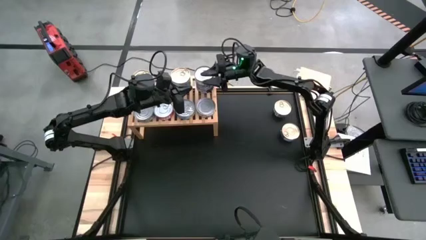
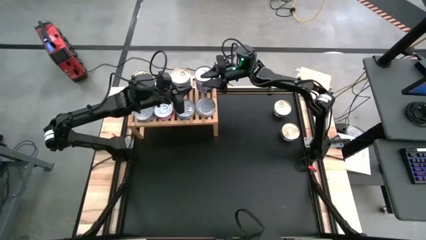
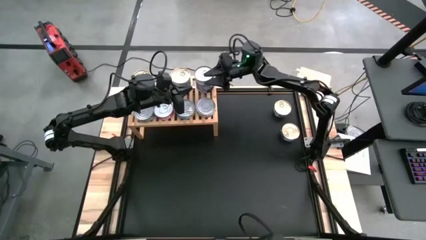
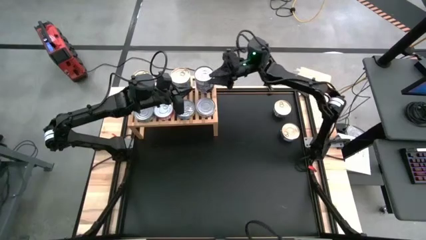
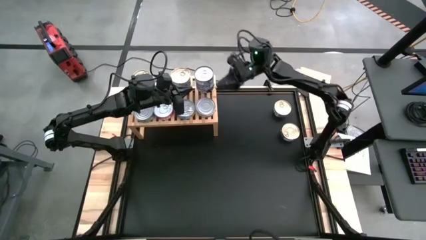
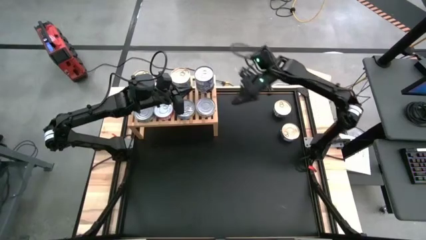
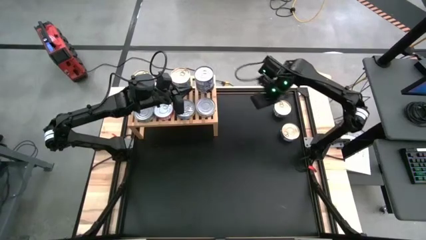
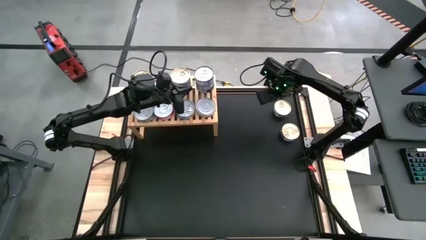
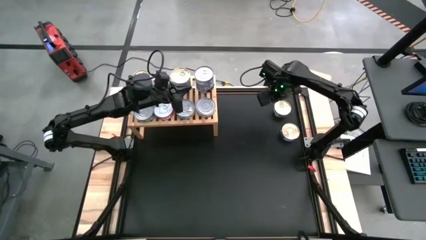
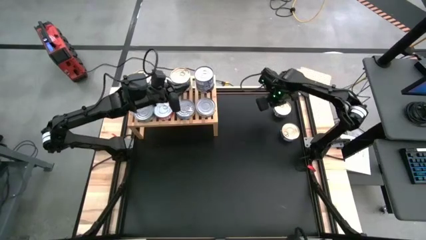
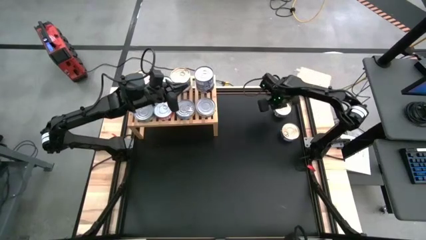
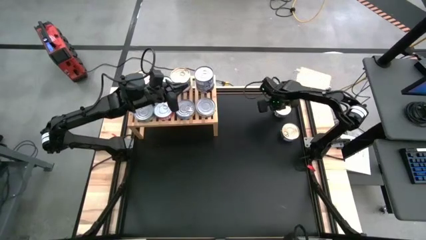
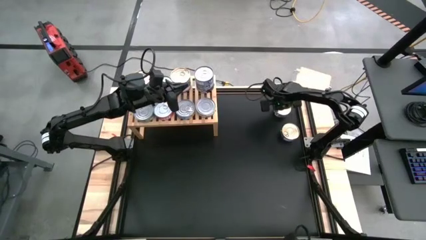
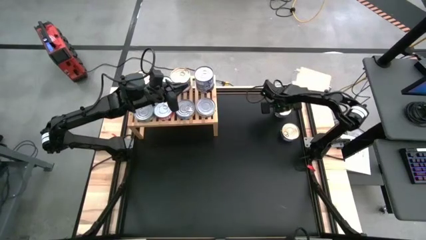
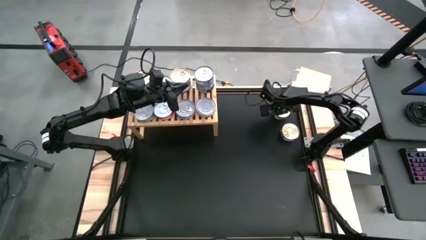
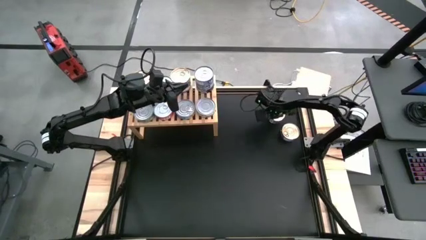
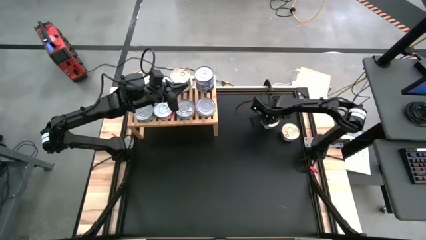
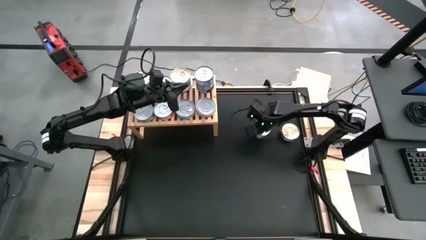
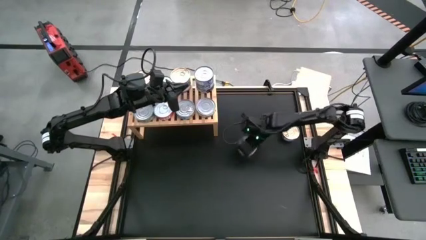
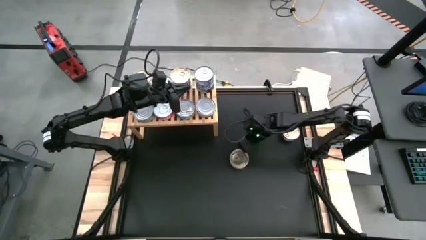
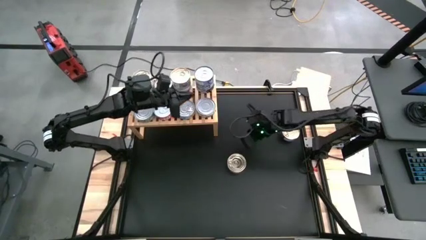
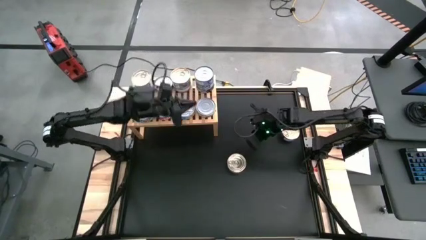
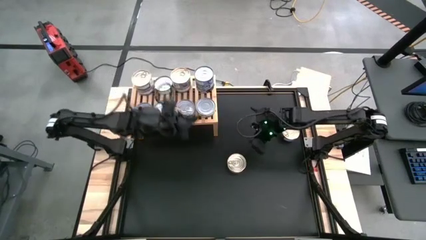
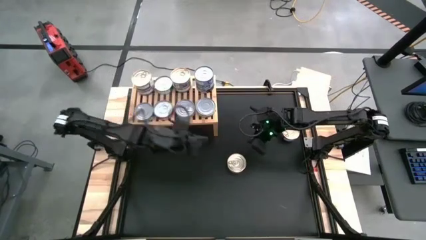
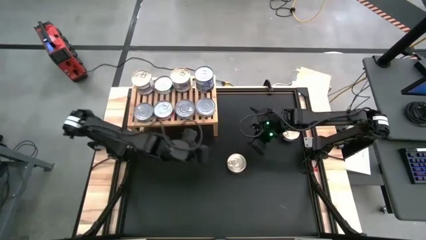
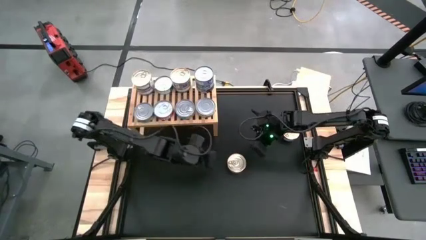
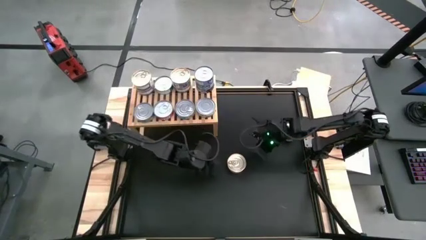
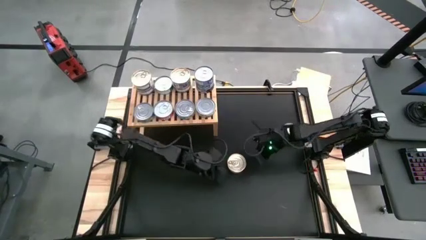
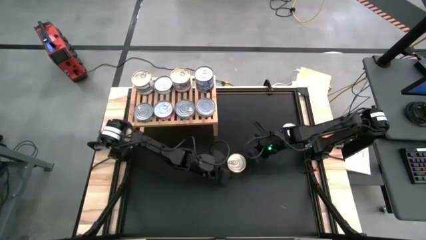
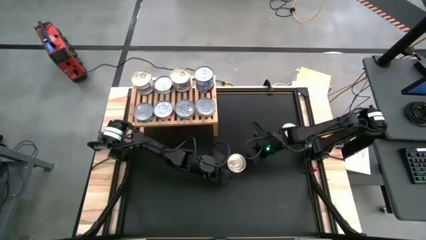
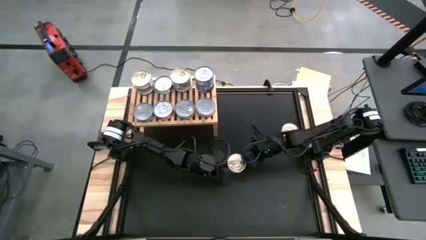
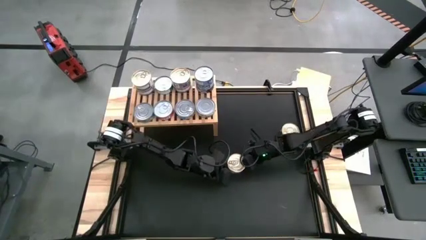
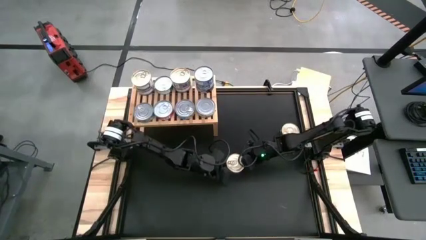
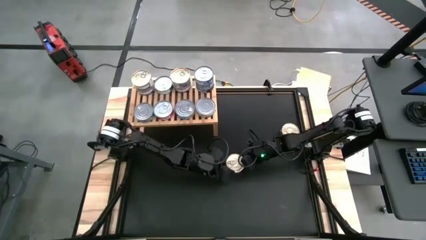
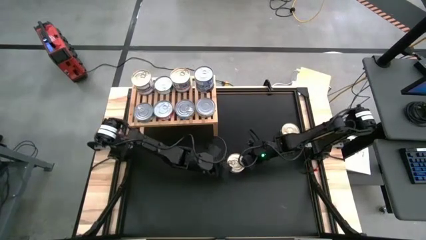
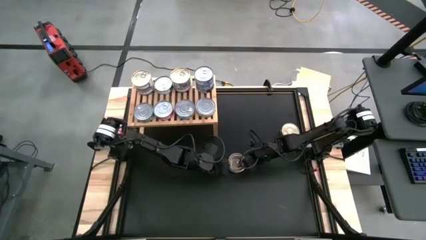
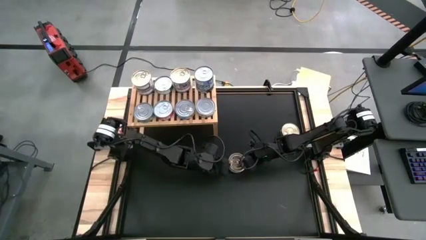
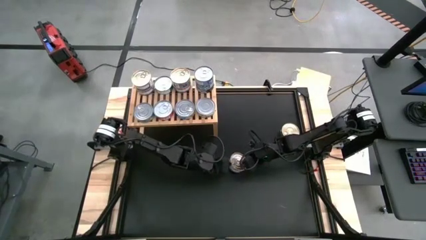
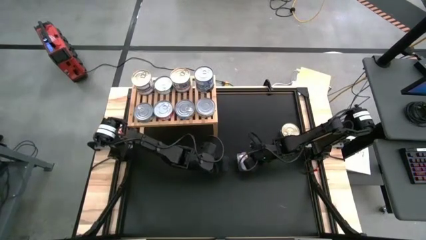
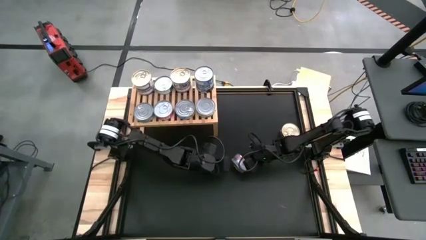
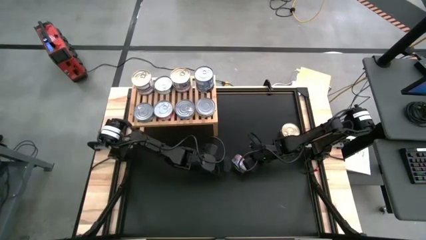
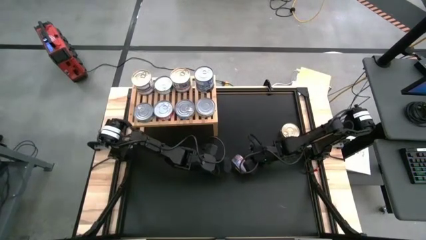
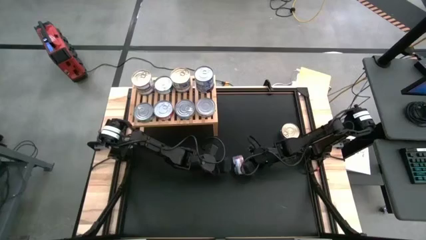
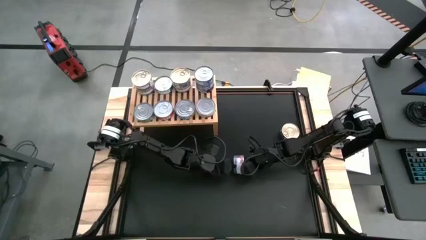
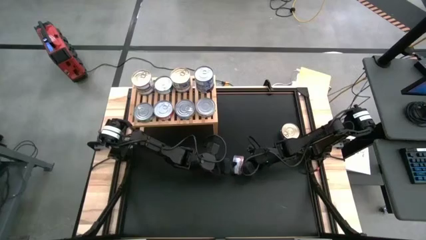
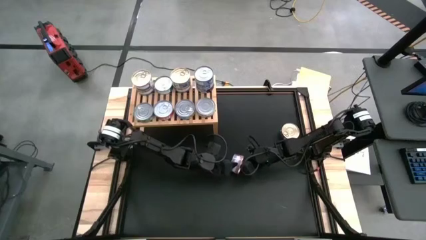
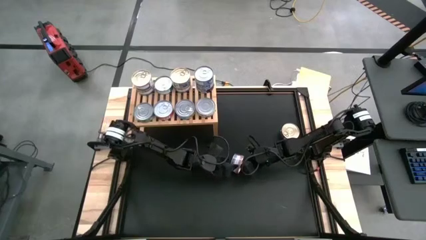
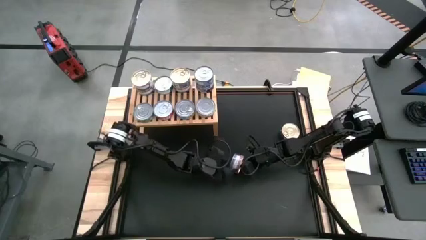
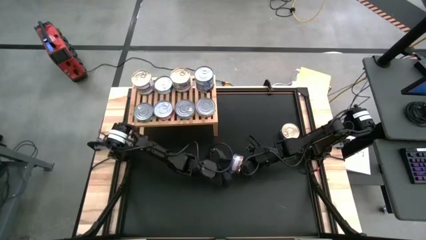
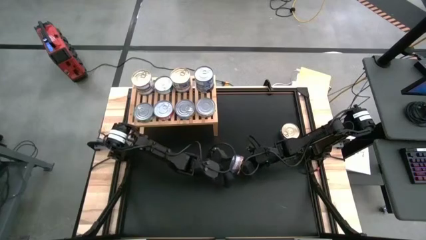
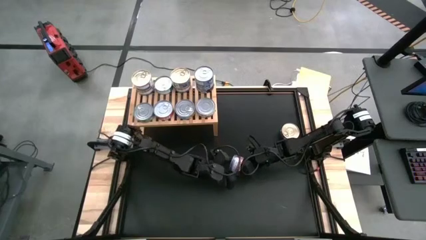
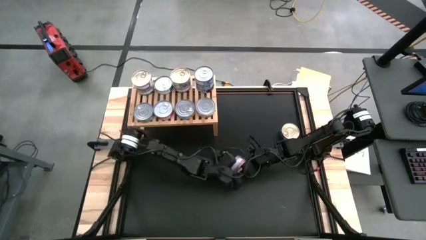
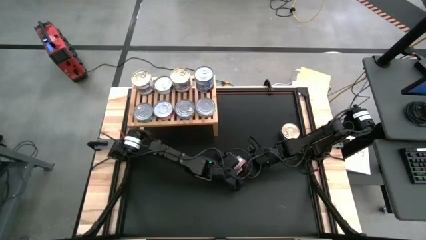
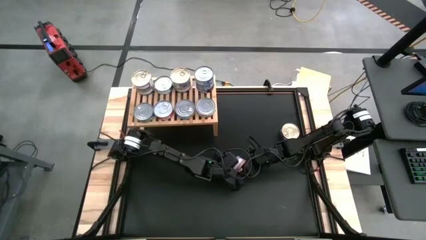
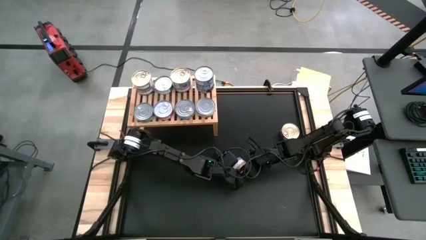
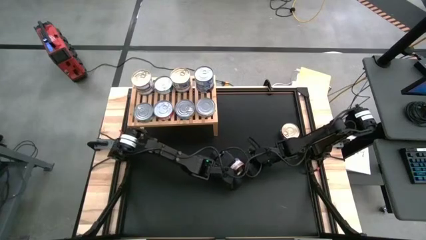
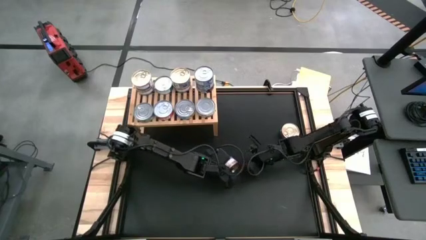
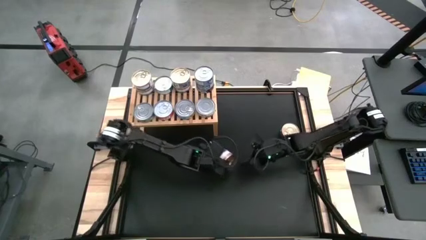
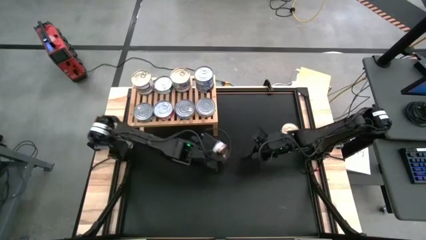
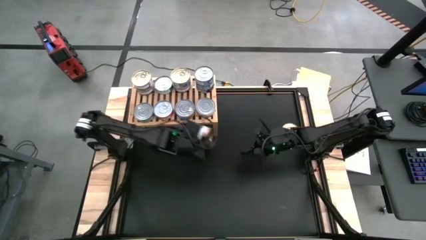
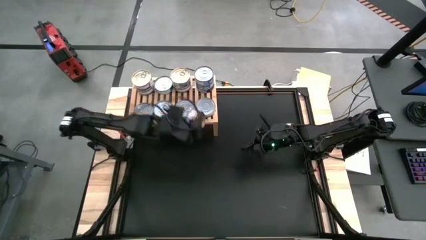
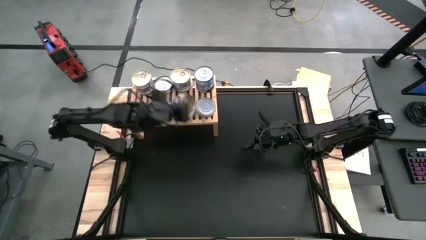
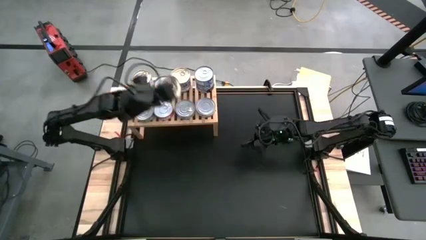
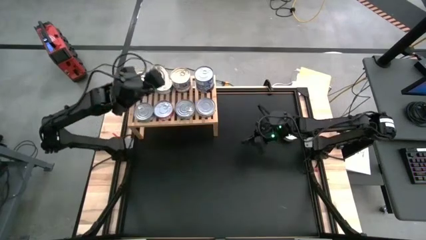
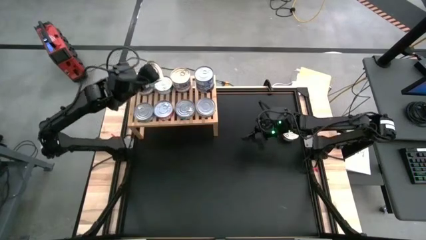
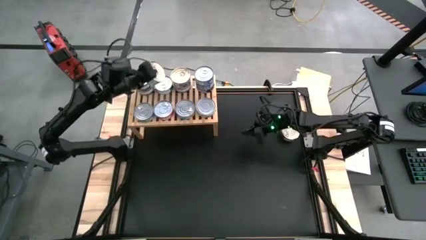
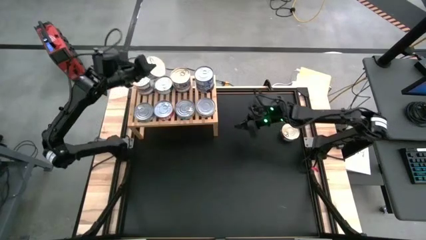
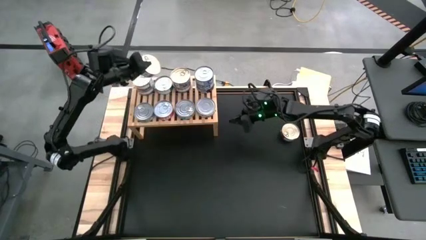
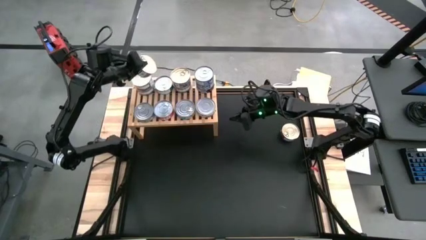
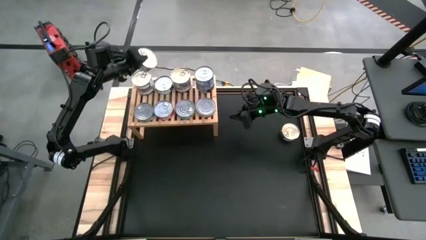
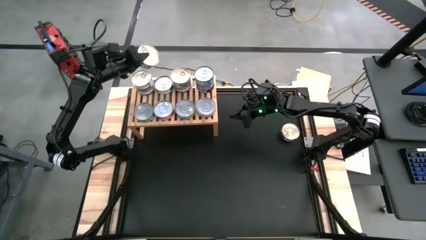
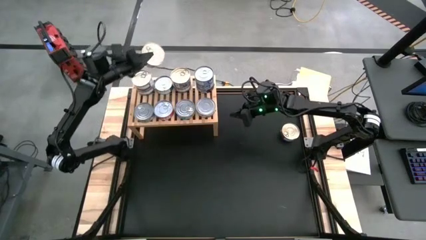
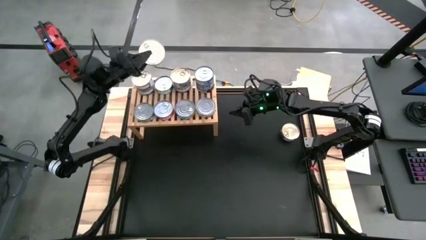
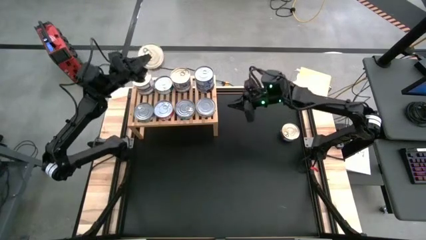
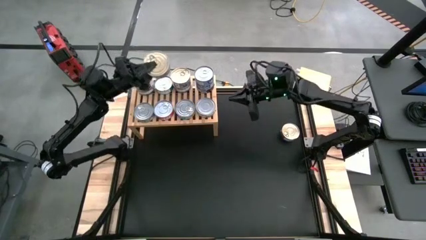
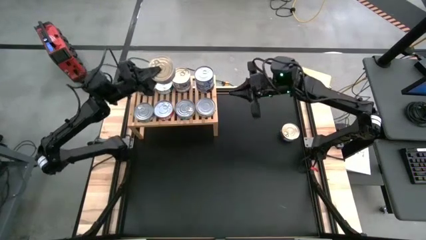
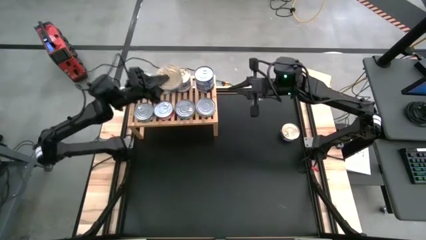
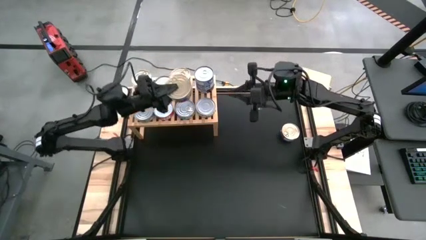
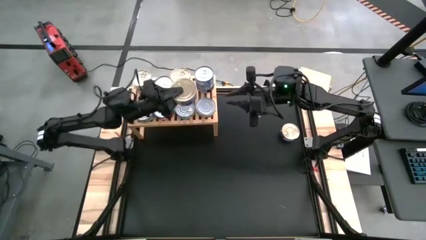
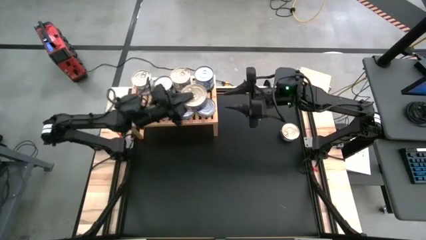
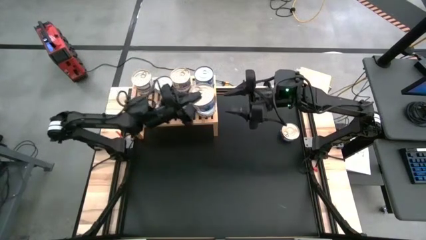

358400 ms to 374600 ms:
Task: Stack canned seafood by type on shelf
Stack the blue pink tuna can on top of the other blue pink tuna can on the shelf
